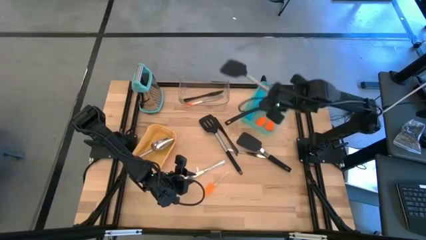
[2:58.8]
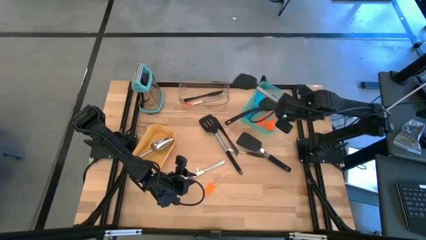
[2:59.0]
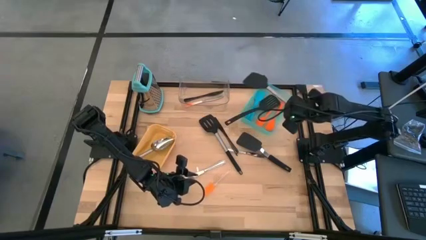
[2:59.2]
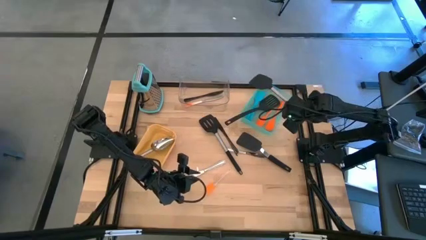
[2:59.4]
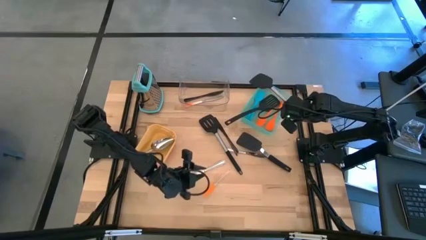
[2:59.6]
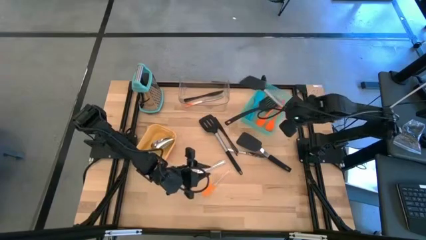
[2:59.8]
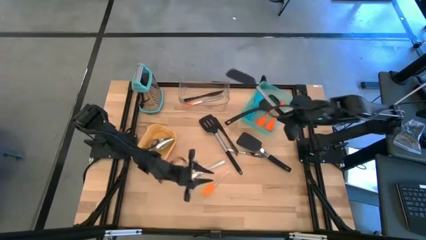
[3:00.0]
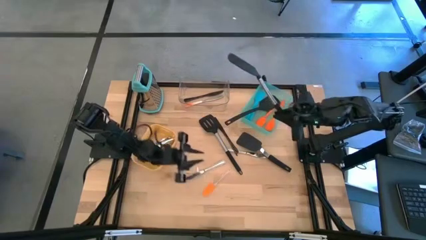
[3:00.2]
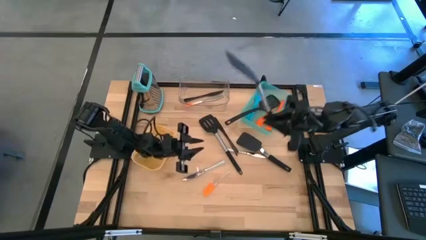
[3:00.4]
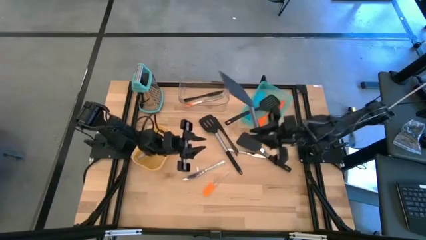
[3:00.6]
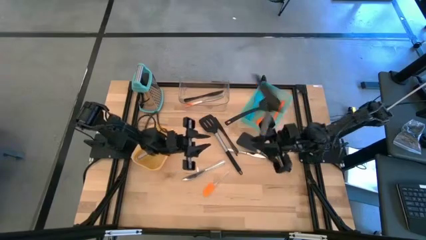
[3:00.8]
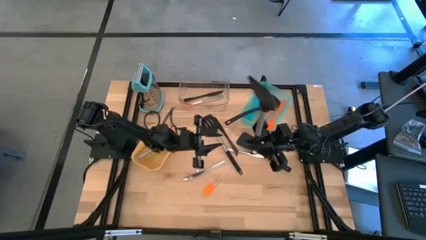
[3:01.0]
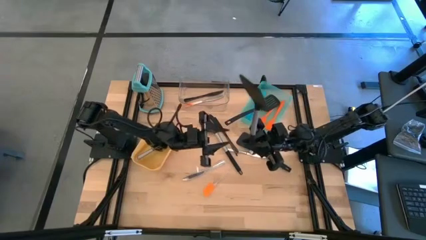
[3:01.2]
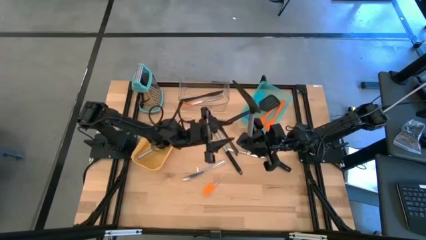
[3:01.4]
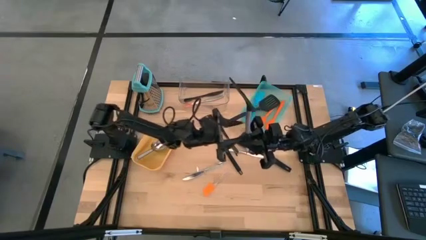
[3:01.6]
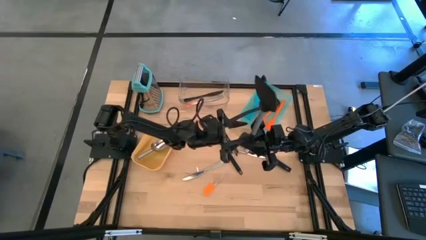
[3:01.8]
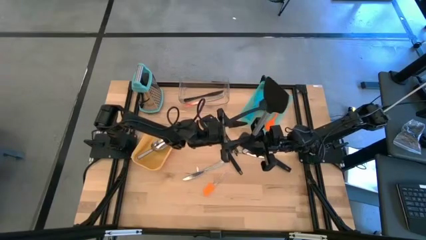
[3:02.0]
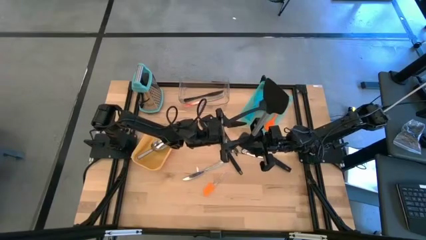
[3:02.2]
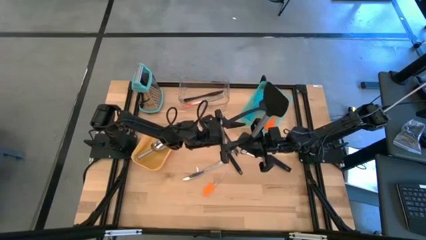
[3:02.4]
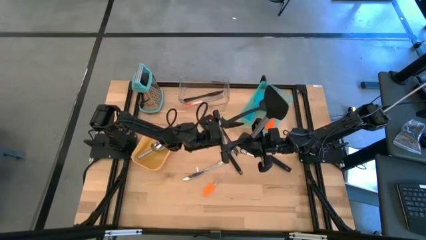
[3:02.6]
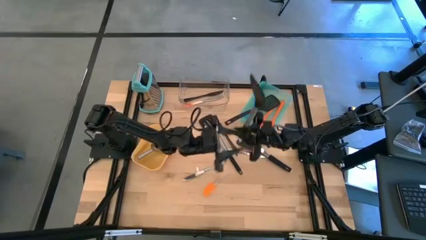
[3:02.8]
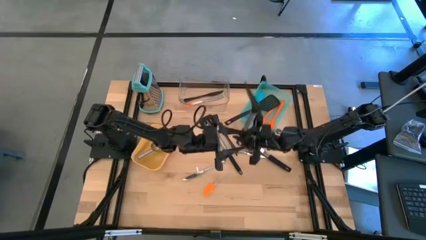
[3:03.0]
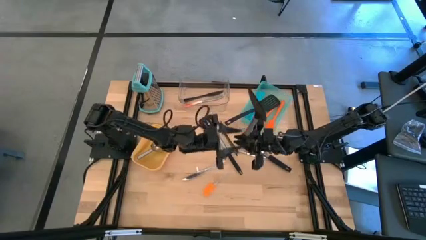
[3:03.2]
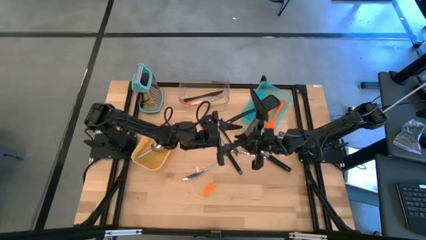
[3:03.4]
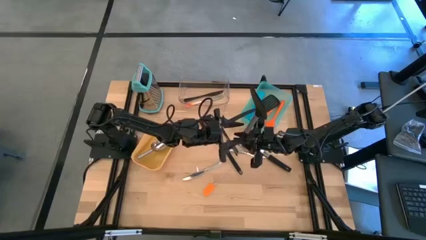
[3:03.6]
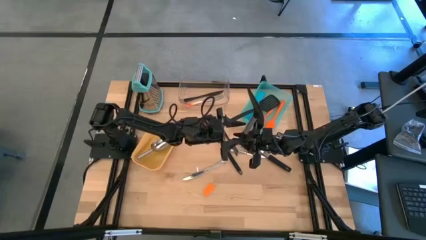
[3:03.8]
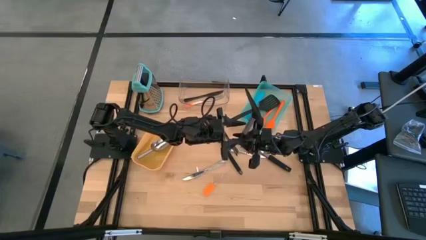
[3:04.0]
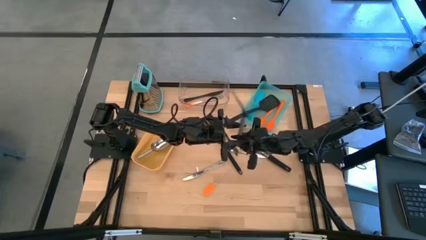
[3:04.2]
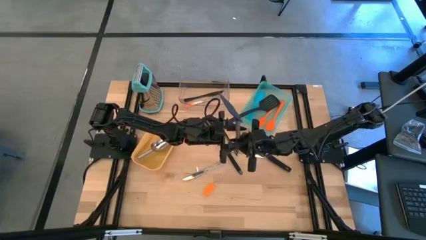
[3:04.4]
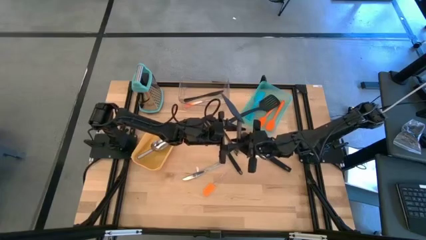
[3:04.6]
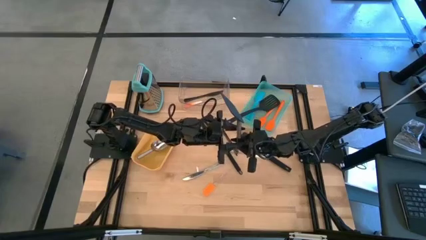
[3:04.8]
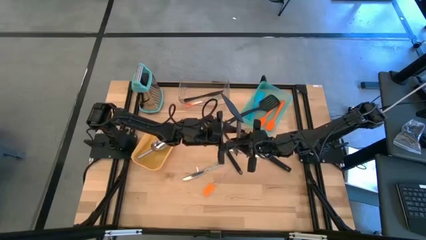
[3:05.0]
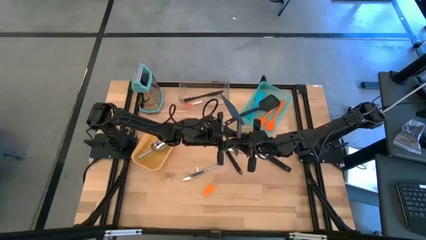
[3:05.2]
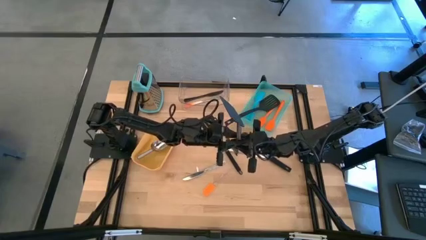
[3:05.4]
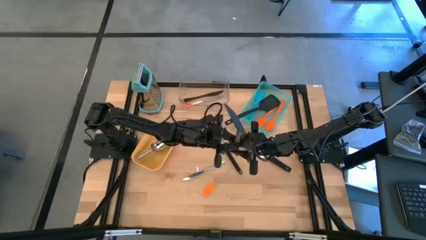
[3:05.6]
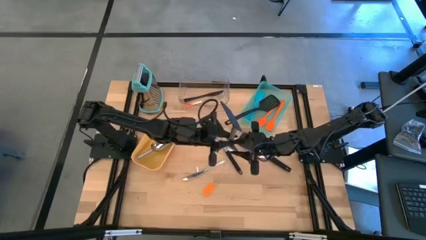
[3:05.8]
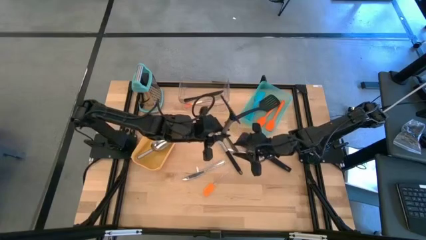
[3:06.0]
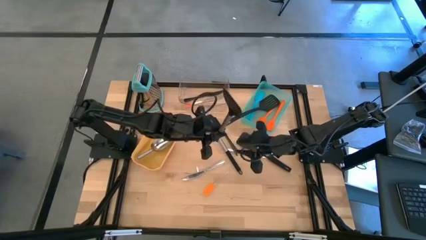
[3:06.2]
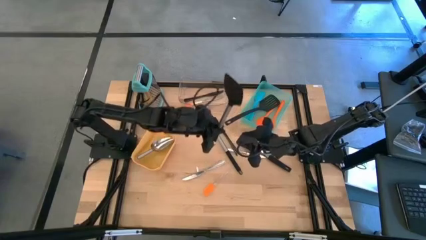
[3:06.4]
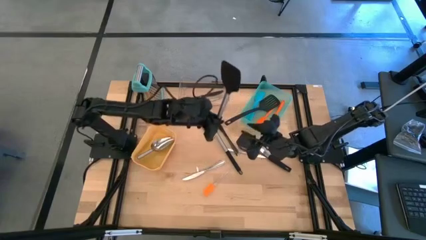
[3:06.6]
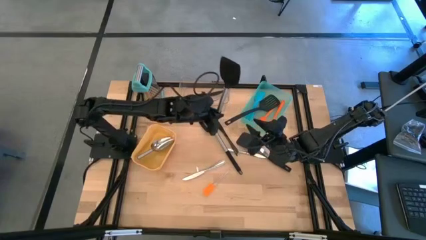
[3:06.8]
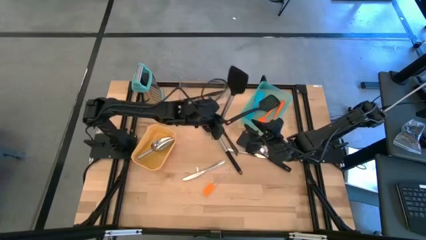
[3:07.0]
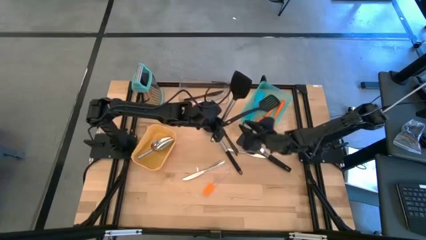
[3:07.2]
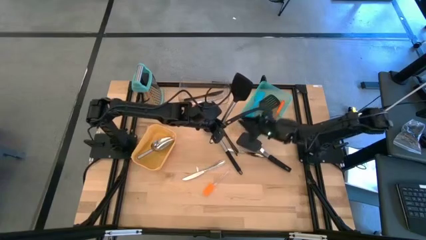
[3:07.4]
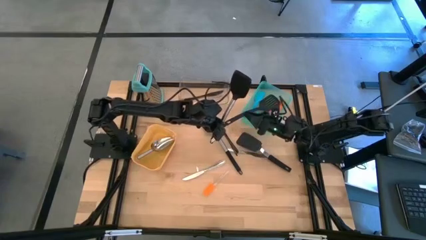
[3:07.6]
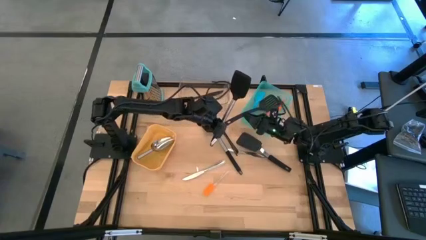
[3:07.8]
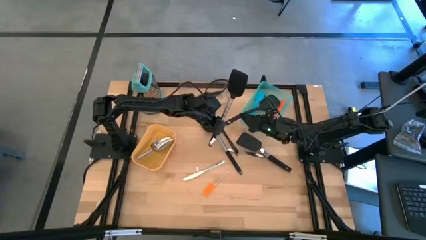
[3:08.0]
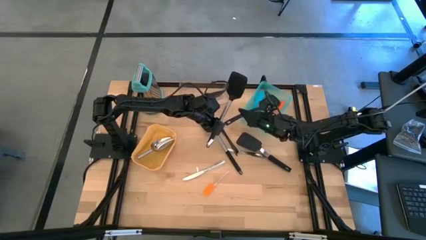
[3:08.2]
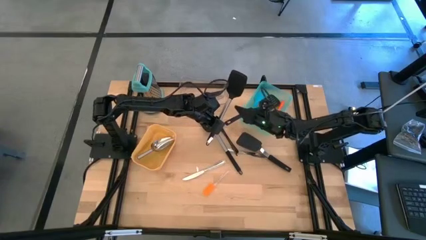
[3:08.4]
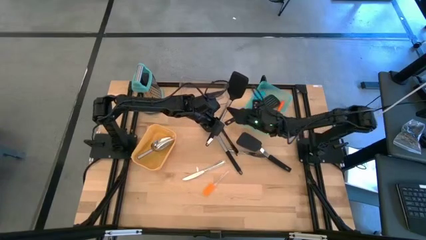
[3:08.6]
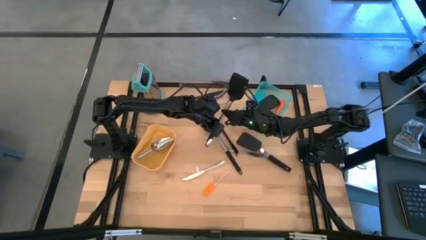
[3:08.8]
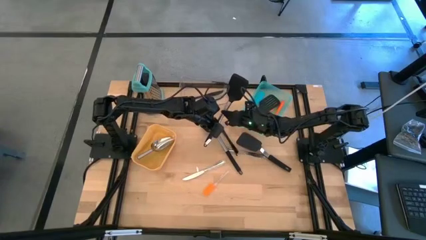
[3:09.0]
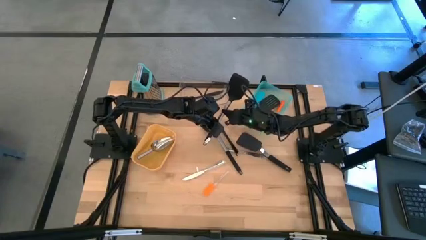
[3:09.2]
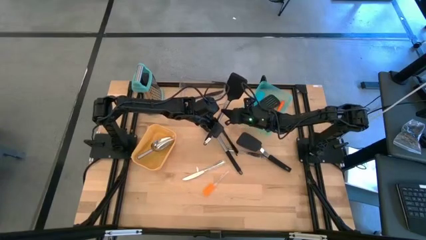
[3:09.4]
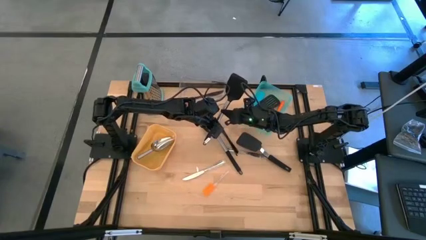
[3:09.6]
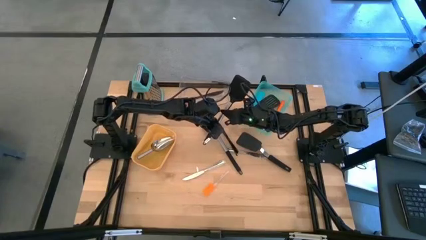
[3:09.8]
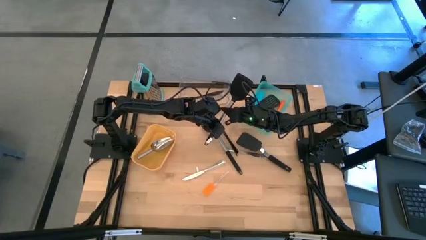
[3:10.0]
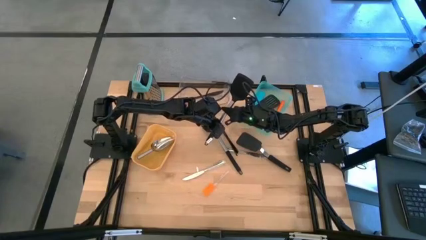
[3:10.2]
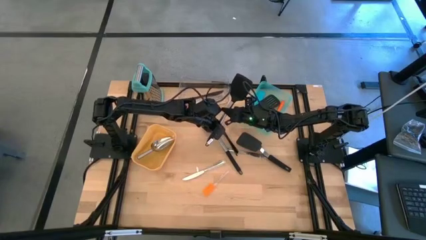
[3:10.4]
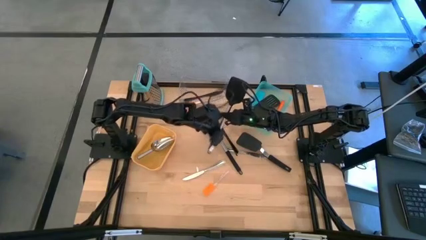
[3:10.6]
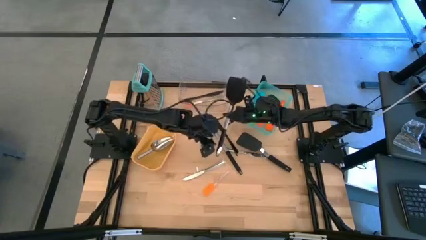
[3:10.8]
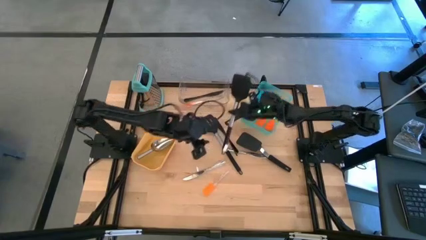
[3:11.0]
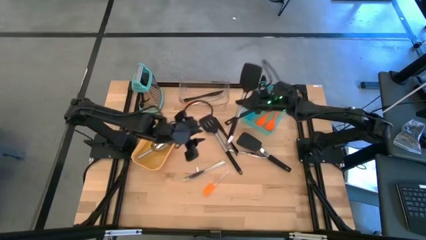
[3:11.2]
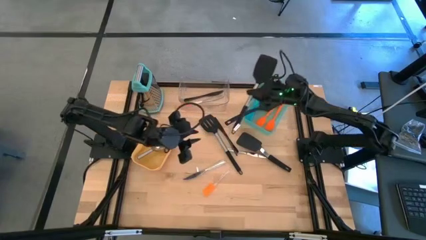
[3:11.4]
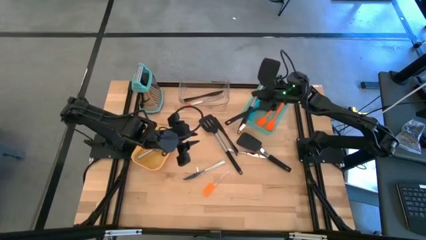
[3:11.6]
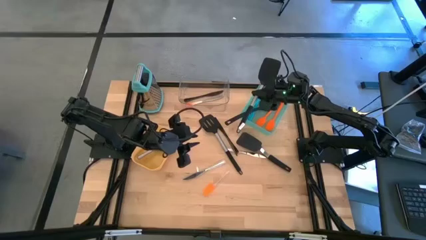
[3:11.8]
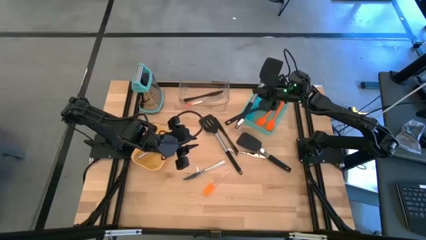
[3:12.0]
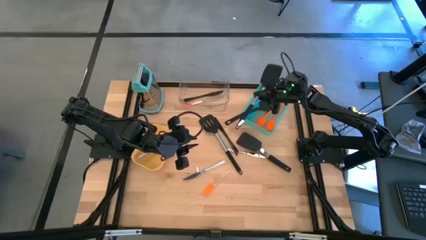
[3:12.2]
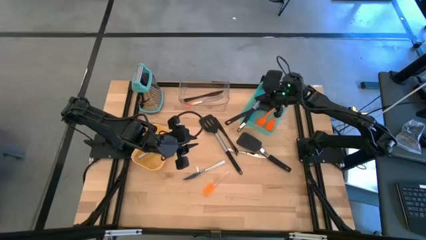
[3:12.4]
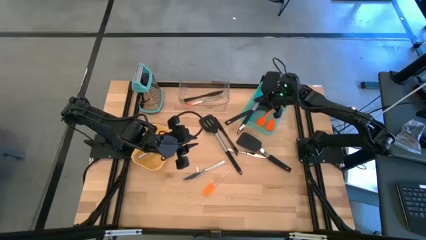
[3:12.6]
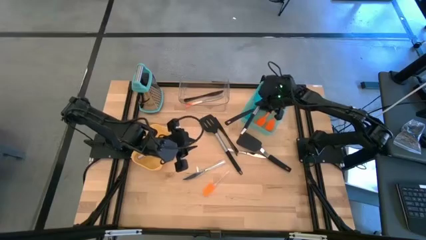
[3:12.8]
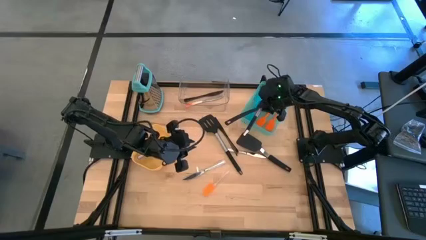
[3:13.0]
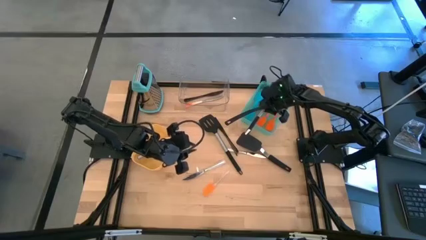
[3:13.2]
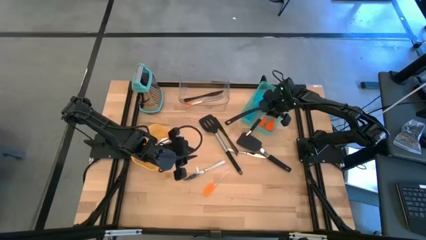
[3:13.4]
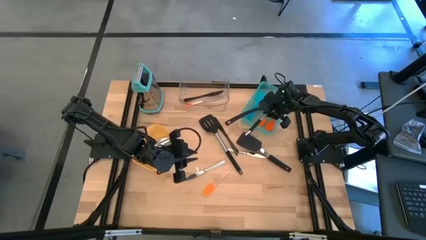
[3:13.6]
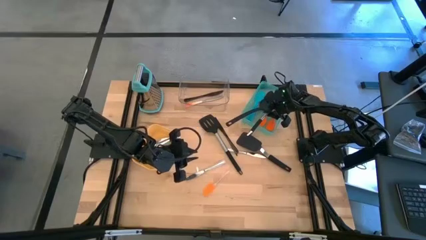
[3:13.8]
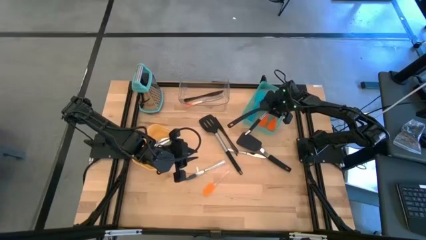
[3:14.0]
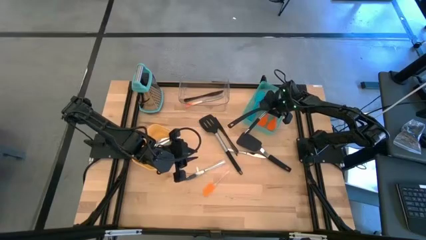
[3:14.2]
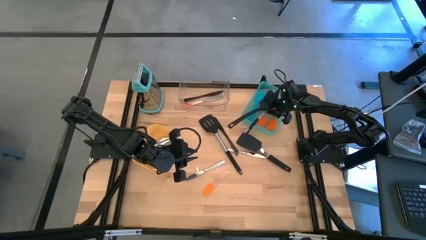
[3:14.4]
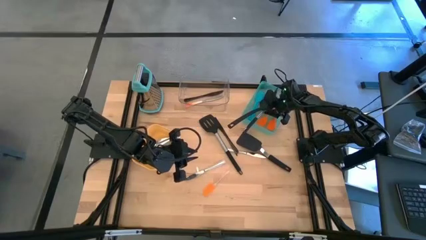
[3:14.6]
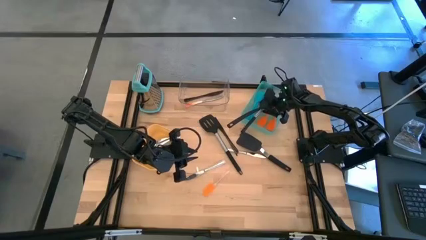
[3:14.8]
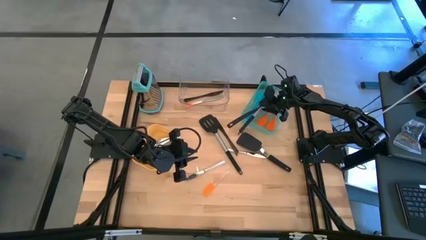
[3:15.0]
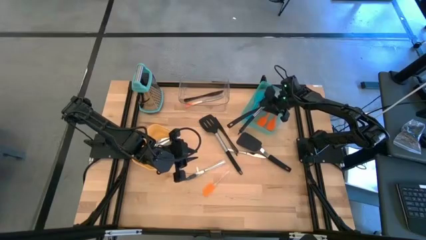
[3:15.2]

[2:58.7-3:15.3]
Task: Pick & Place Kitchen Items
Put the black spatula into the green bin
